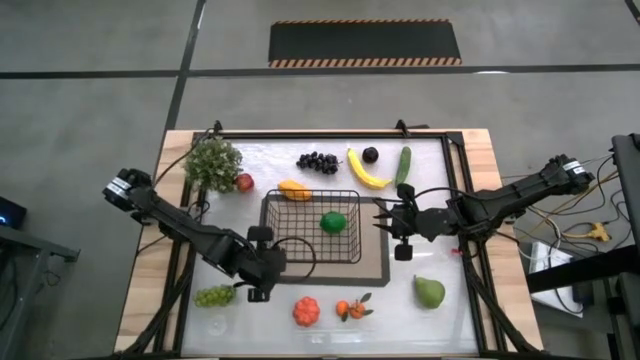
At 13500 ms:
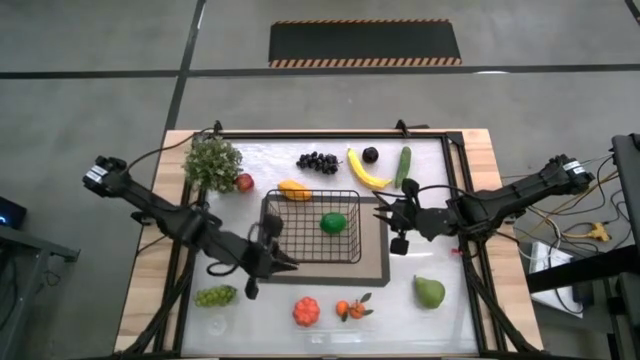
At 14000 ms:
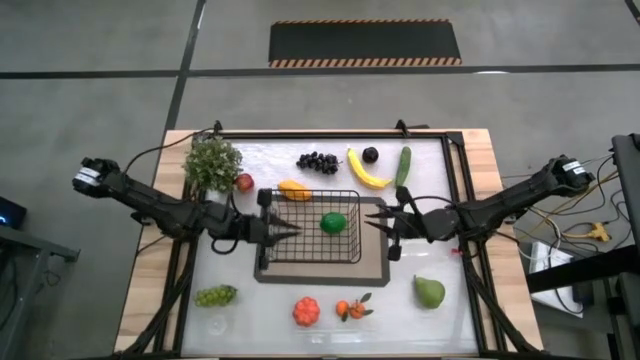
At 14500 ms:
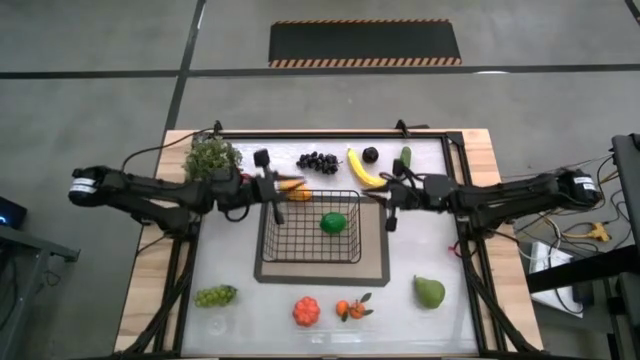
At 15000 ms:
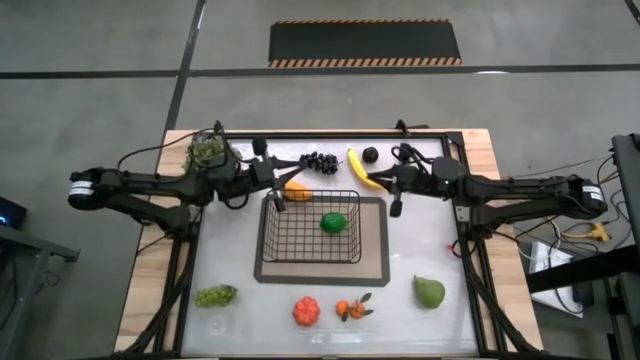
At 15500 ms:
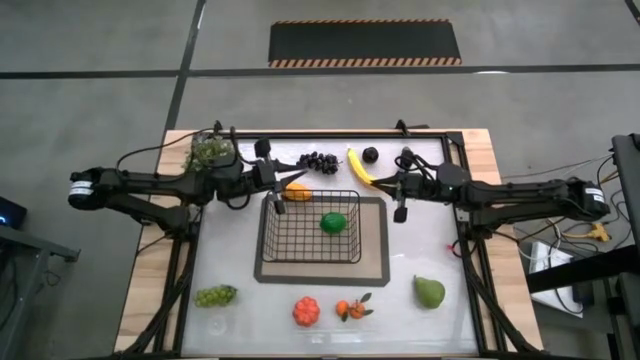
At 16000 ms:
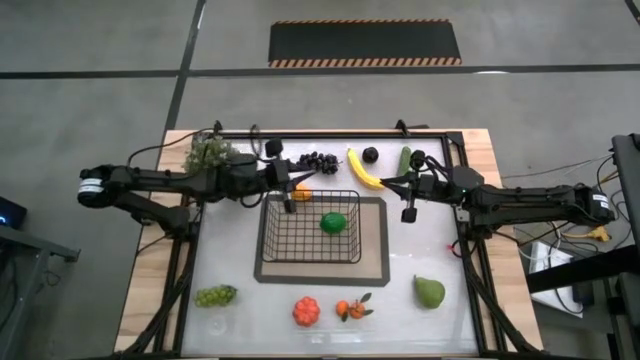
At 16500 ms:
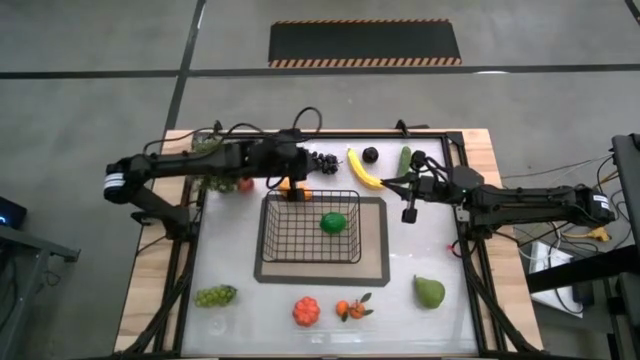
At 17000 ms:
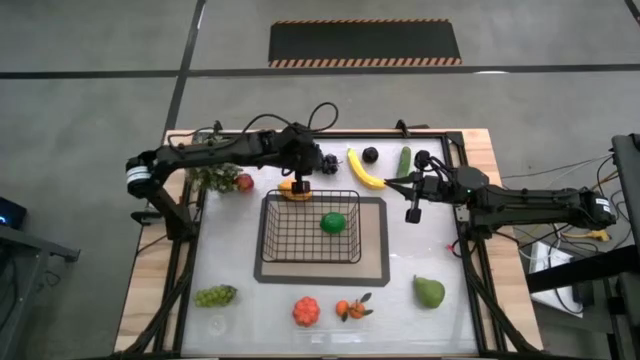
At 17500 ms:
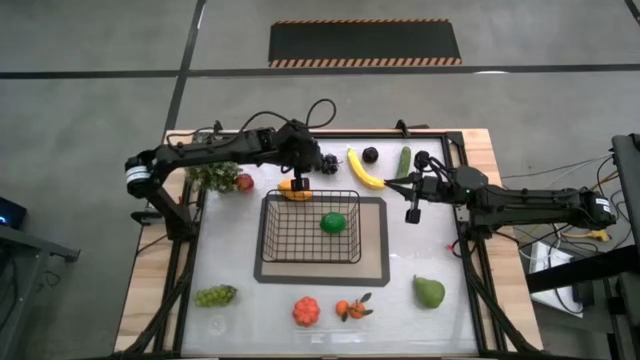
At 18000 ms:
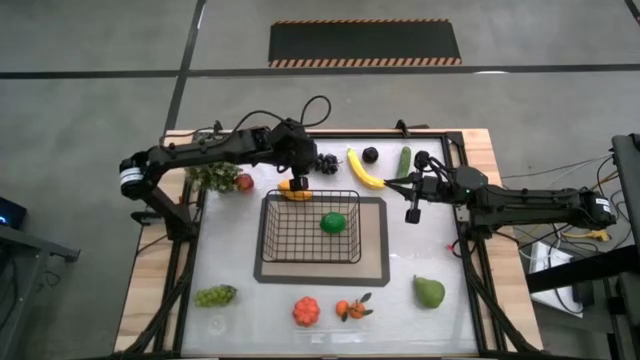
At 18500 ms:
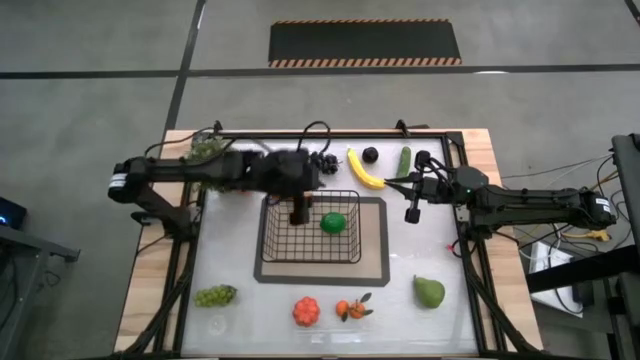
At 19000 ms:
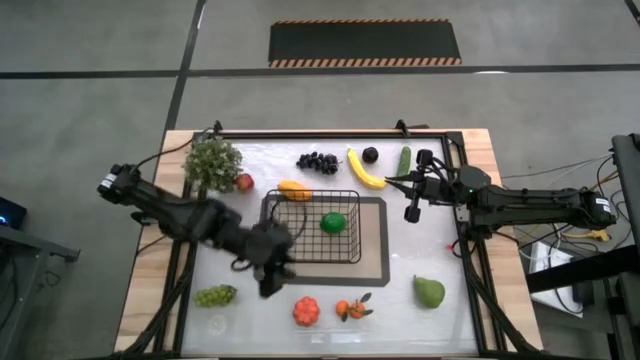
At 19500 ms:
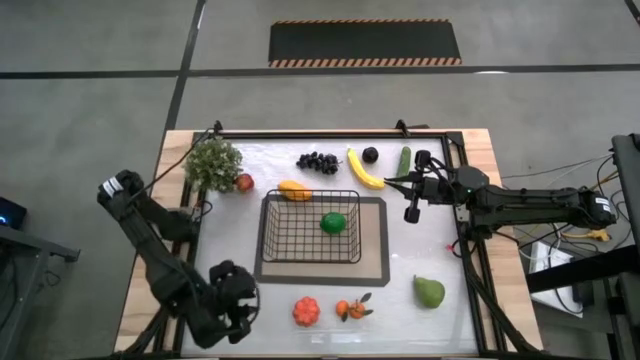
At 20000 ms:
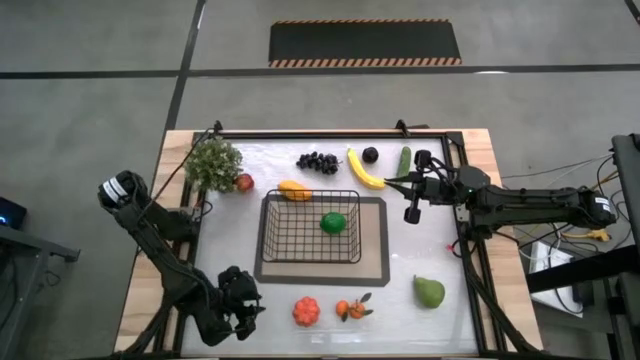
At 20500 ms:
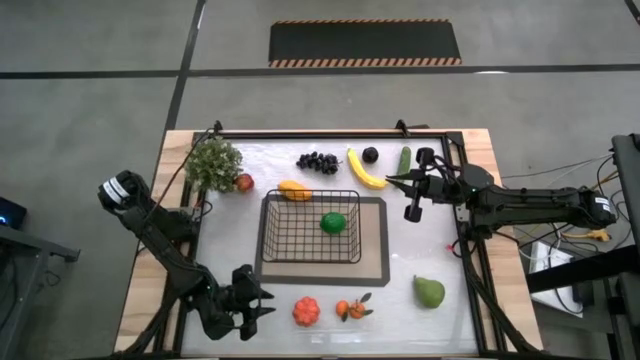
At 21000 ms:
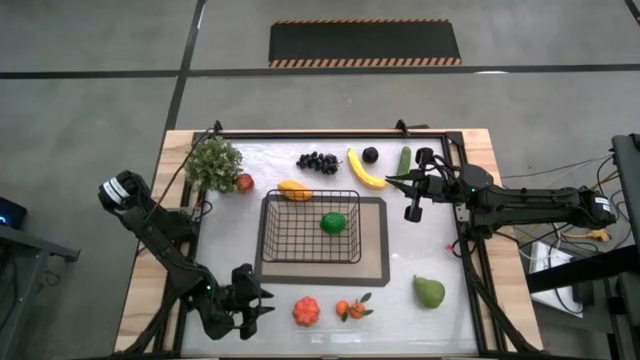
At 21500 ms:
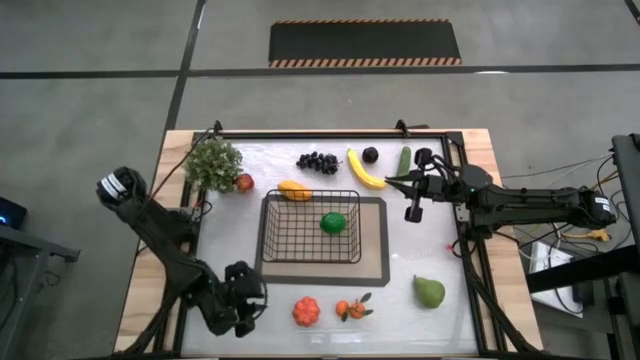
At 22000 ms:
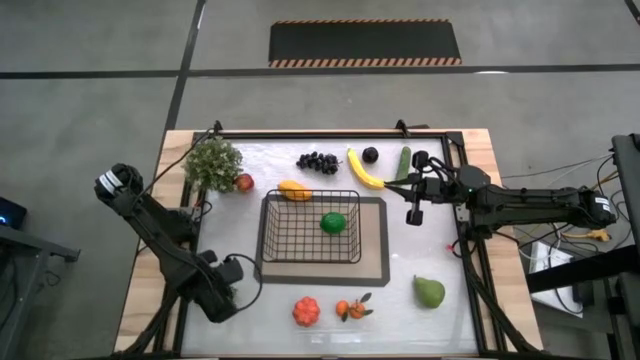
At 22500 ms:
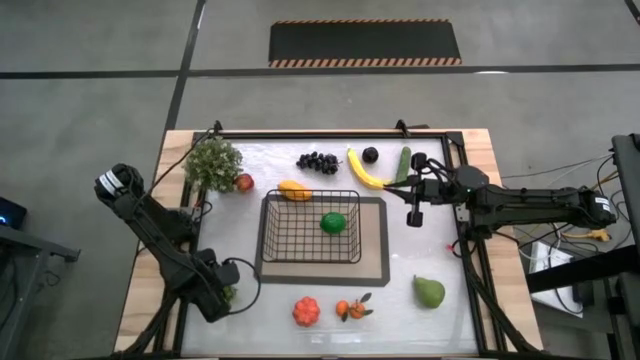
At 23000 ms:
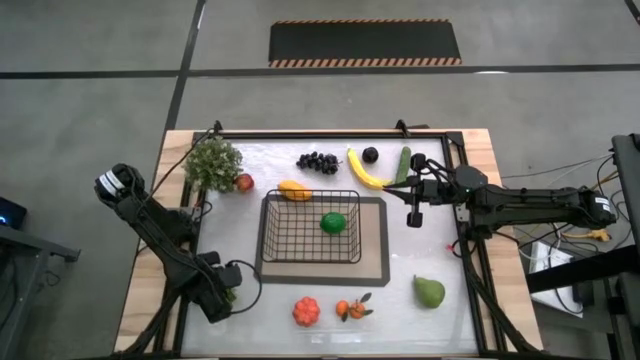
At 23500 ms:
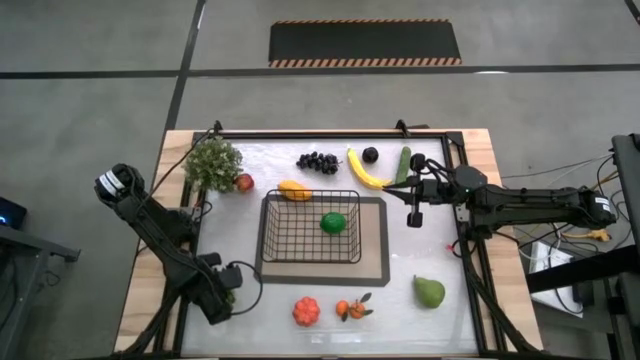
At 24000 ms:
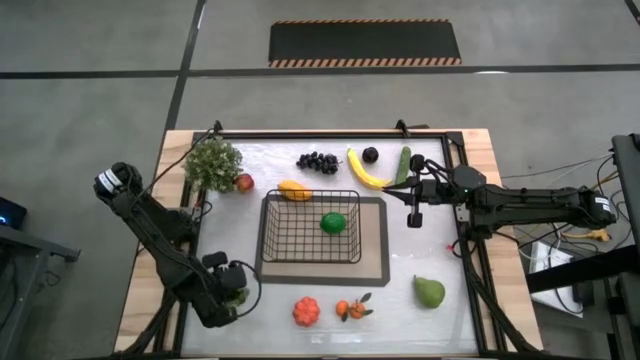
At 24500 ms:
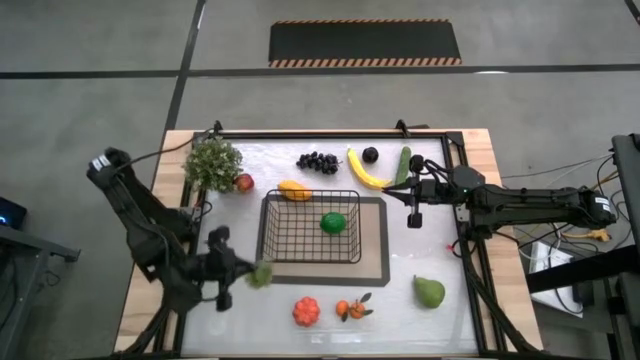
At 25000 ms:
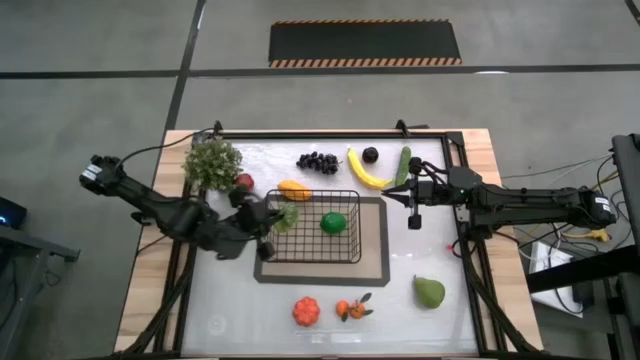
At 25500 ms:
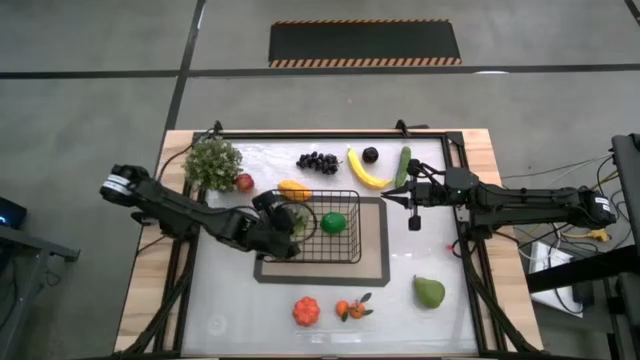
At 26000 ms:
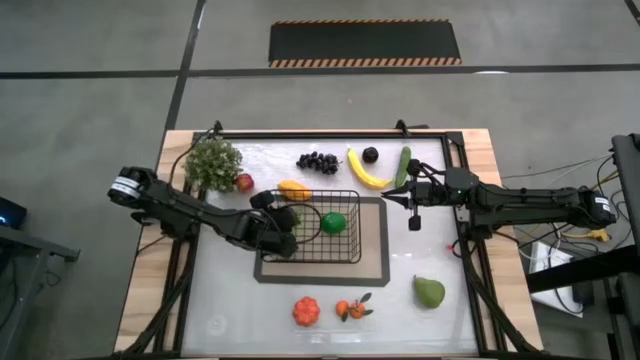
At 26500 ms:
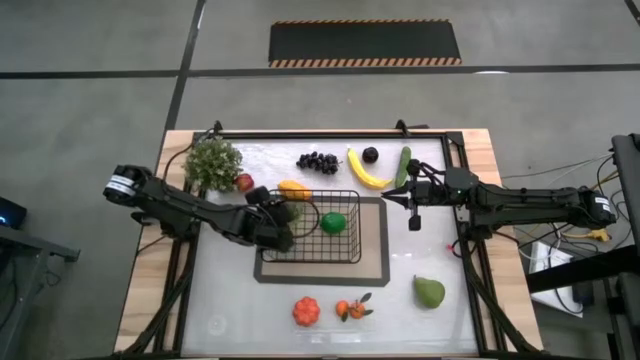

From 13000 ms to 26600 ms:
Task: Build produce basket
Put the green grapes into the black wire basket

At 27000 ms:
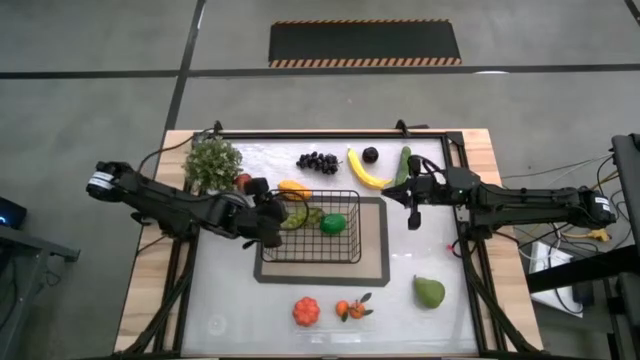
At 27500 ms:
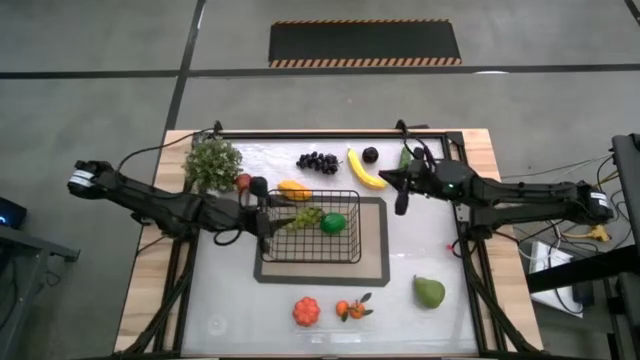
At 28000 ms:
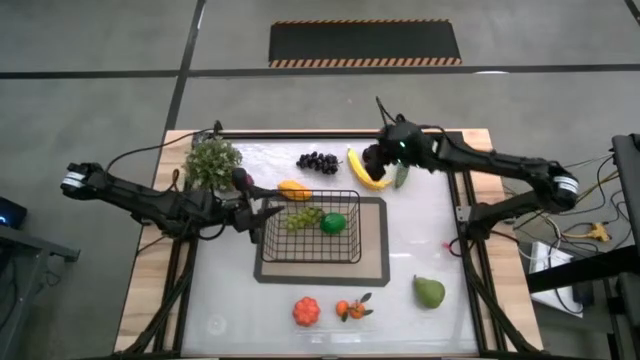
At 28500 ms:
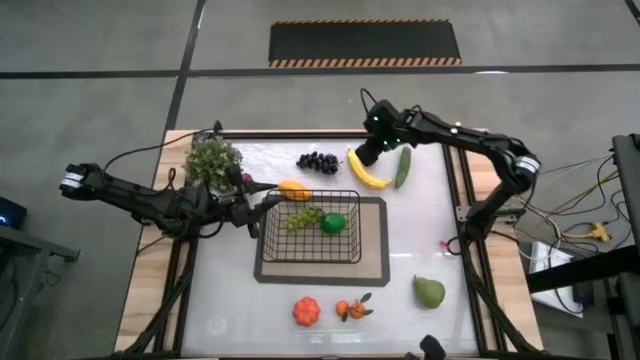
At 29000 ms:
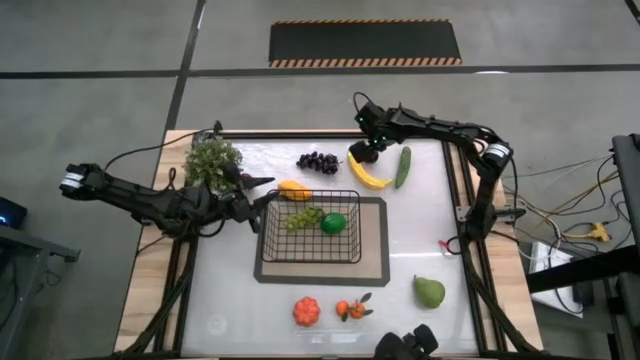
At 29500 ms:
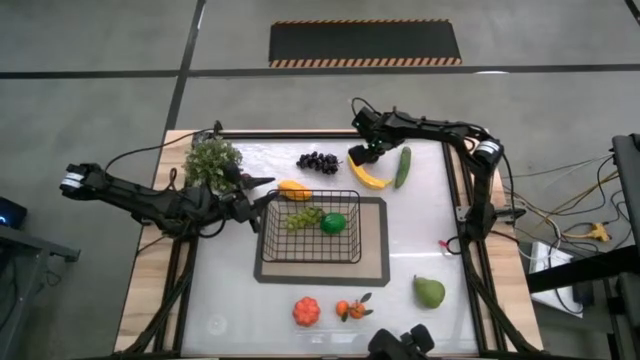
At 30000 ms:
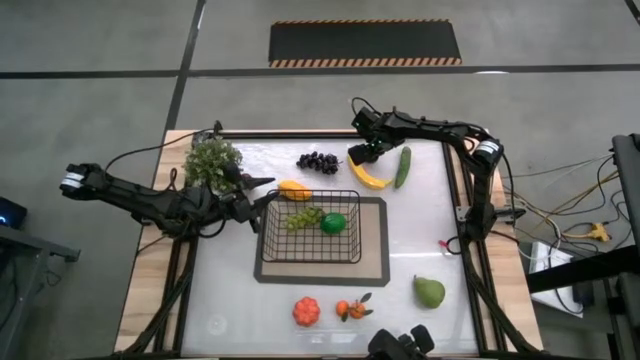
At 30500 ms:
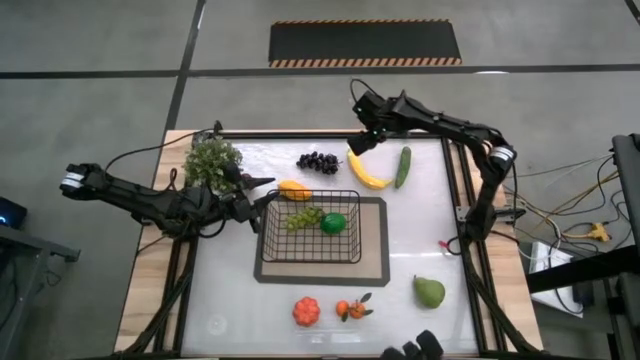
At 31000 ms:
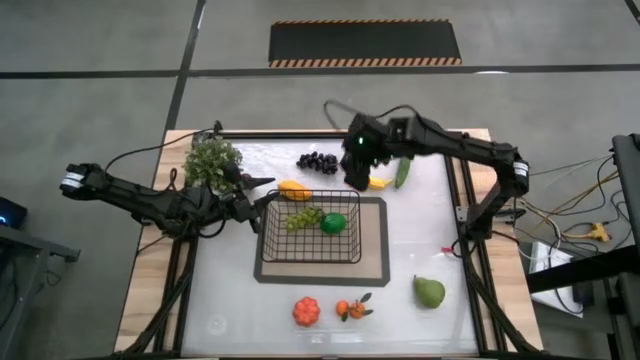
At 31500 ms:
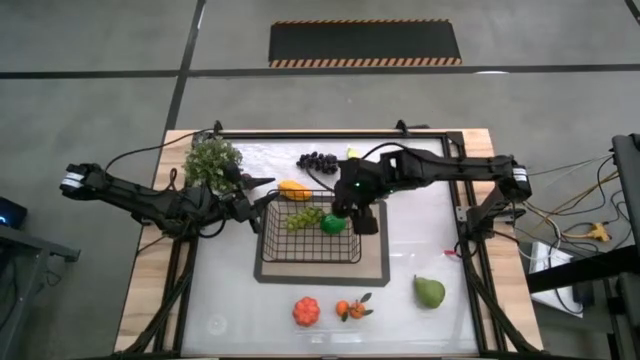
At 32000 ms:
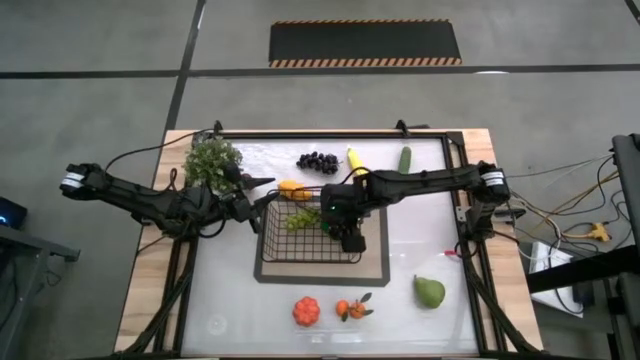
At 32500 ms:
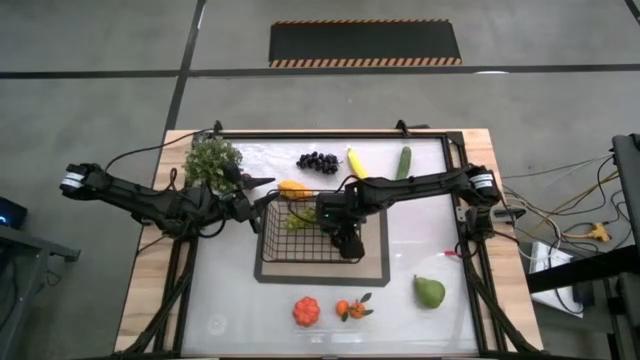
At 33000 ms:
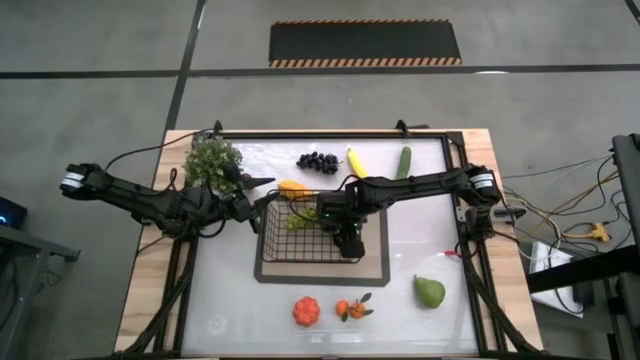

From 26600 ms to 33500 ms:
Put the black plum into the black wire basket
